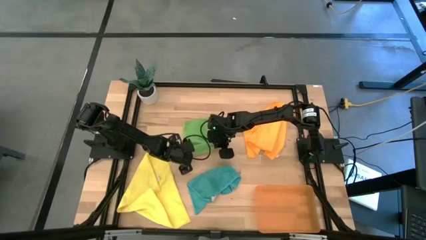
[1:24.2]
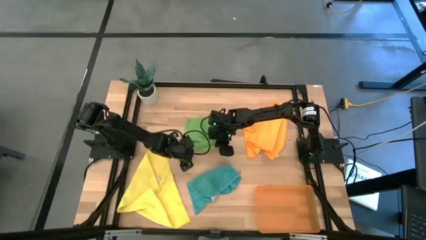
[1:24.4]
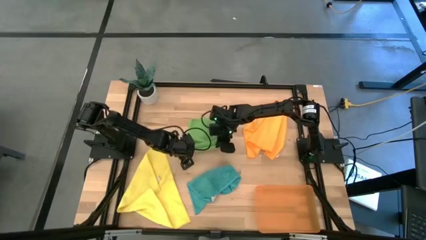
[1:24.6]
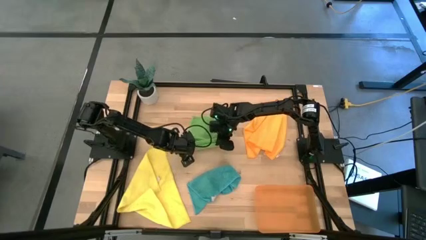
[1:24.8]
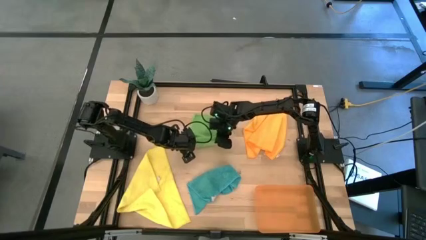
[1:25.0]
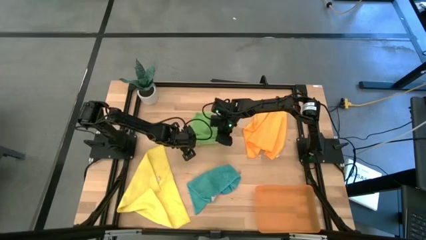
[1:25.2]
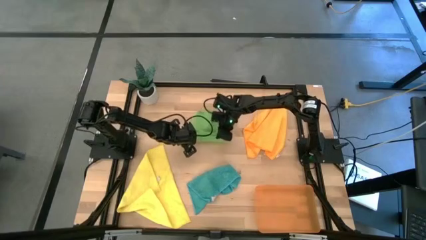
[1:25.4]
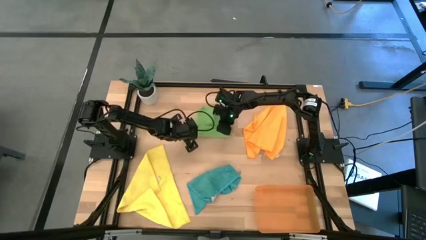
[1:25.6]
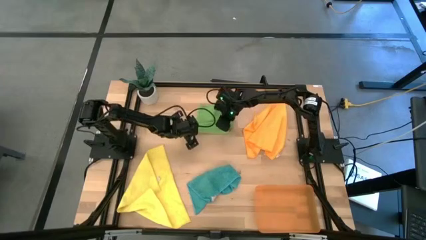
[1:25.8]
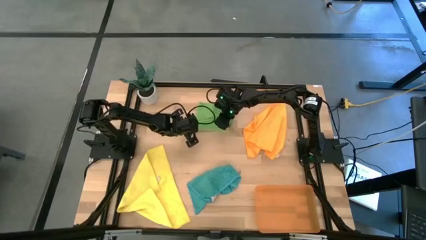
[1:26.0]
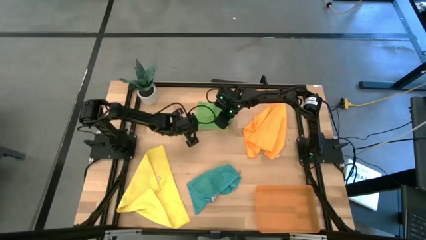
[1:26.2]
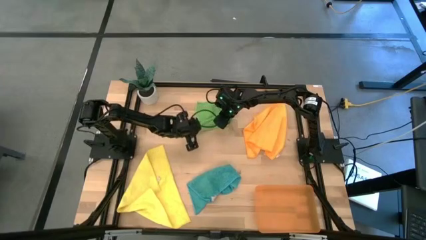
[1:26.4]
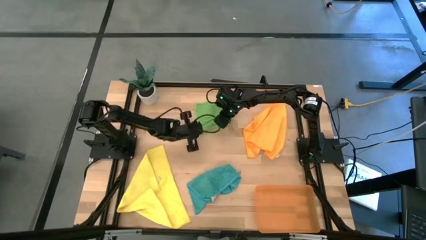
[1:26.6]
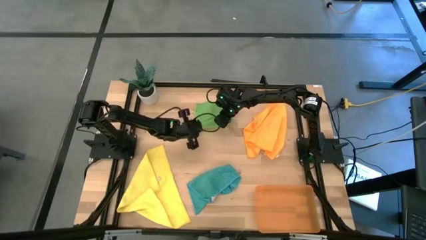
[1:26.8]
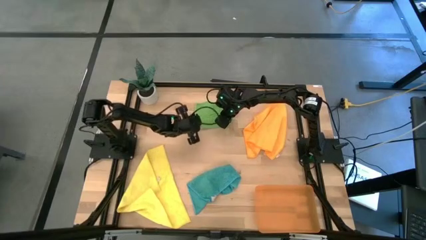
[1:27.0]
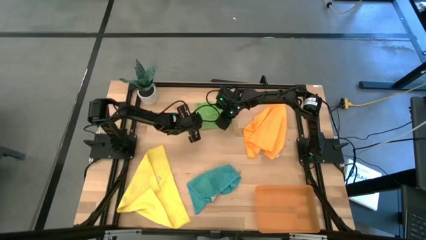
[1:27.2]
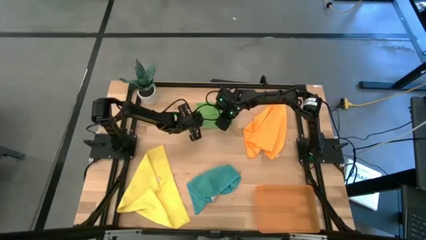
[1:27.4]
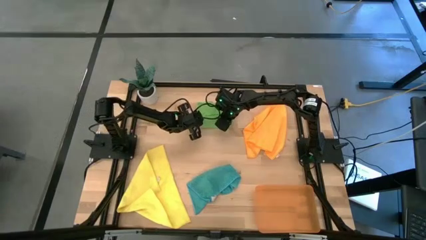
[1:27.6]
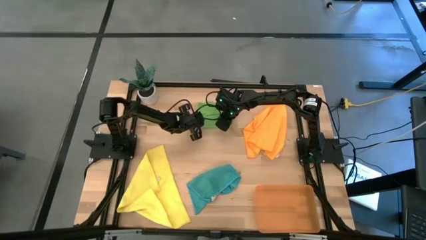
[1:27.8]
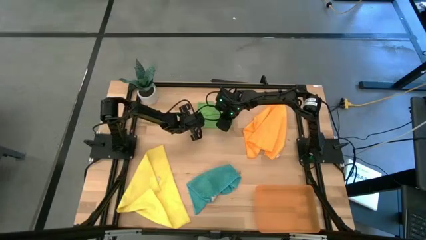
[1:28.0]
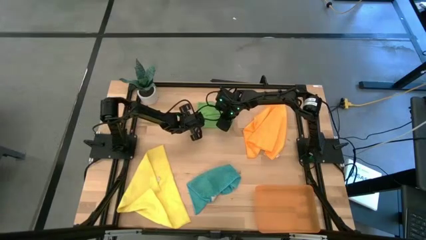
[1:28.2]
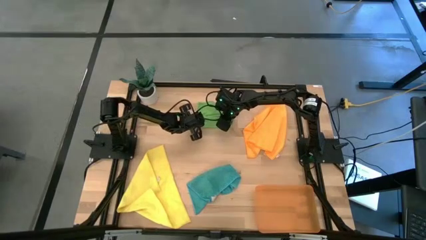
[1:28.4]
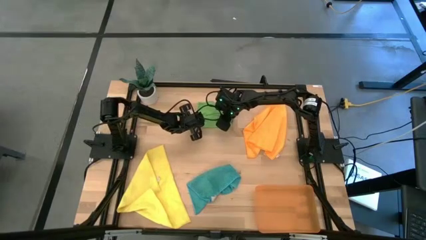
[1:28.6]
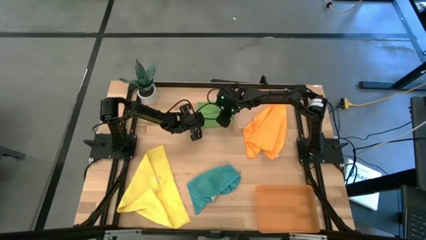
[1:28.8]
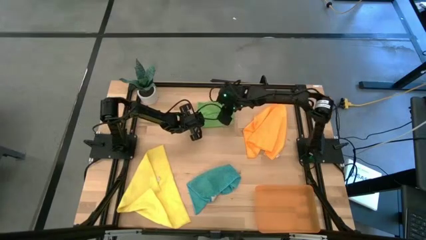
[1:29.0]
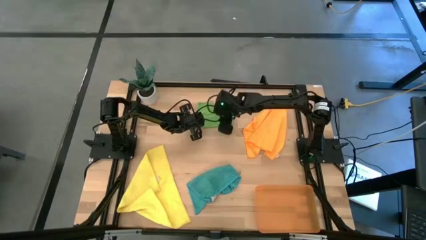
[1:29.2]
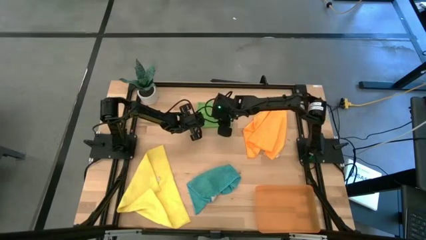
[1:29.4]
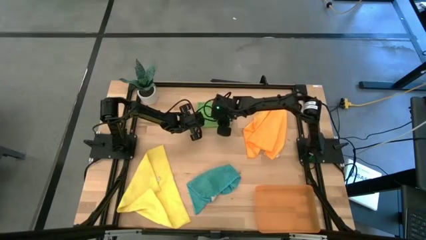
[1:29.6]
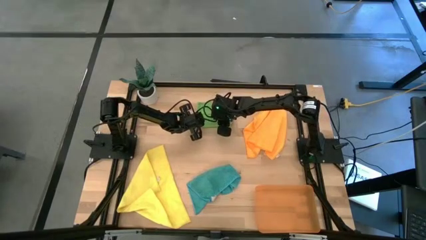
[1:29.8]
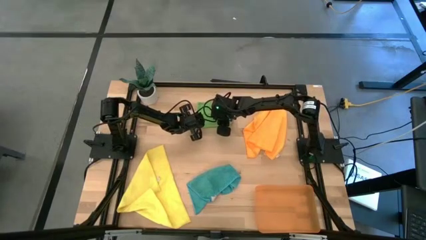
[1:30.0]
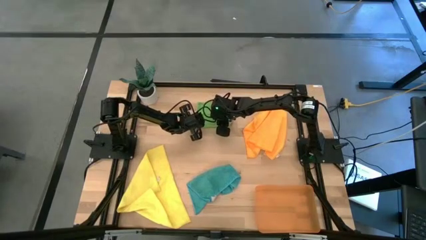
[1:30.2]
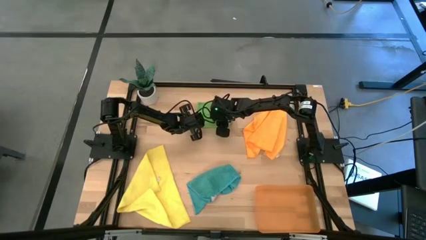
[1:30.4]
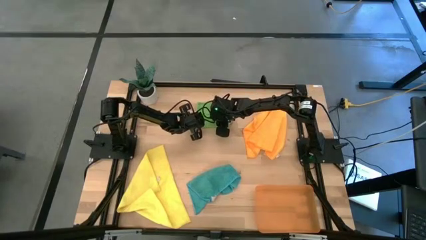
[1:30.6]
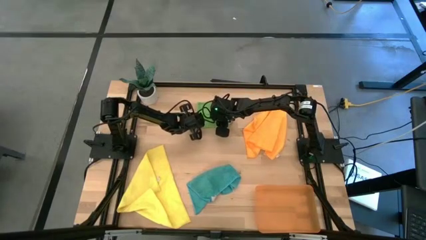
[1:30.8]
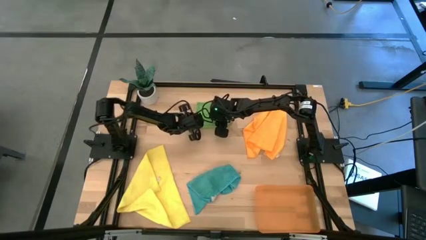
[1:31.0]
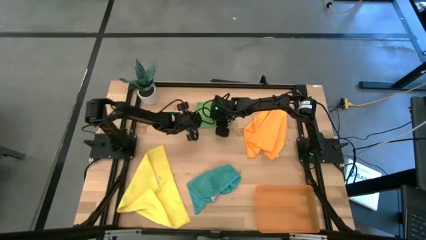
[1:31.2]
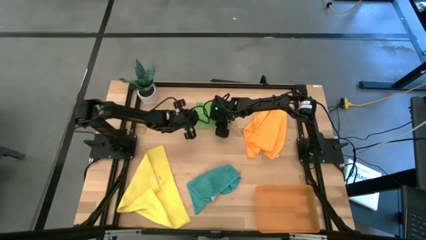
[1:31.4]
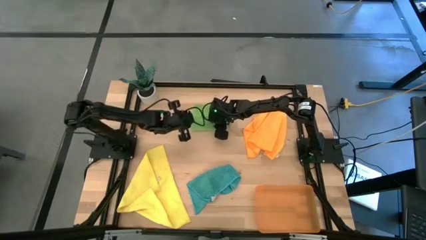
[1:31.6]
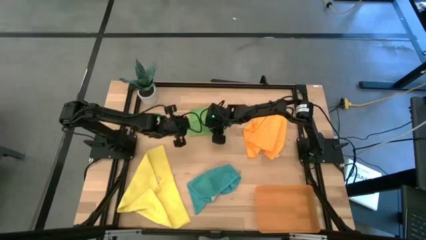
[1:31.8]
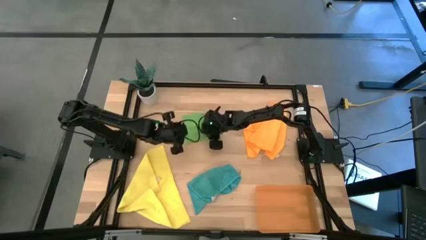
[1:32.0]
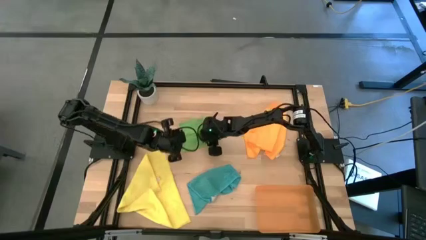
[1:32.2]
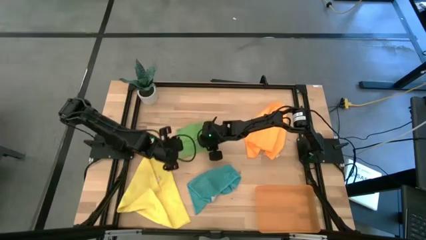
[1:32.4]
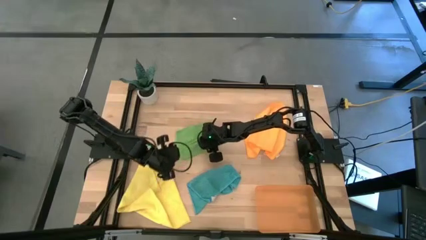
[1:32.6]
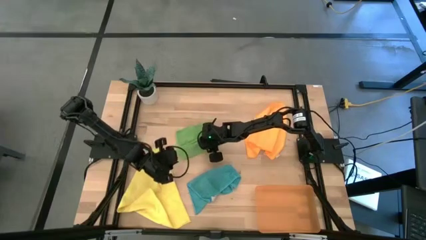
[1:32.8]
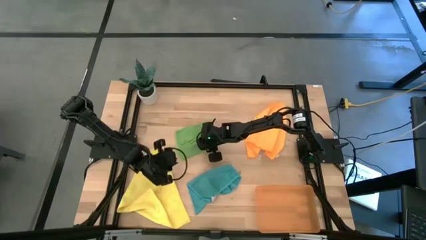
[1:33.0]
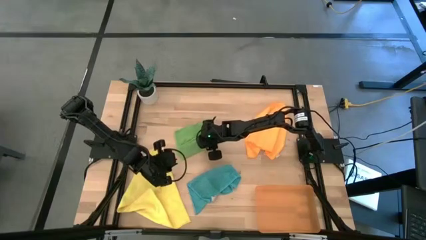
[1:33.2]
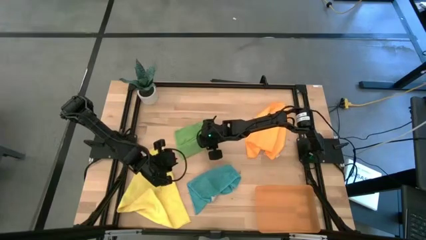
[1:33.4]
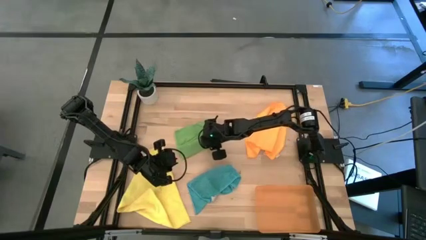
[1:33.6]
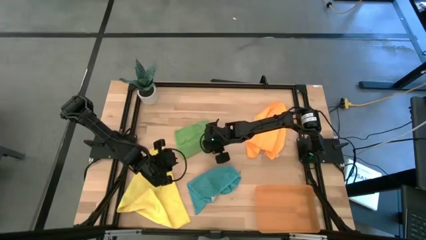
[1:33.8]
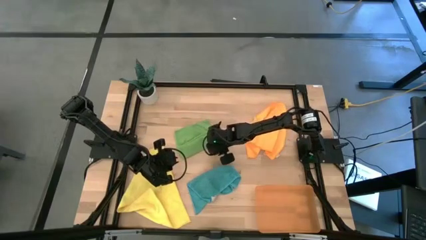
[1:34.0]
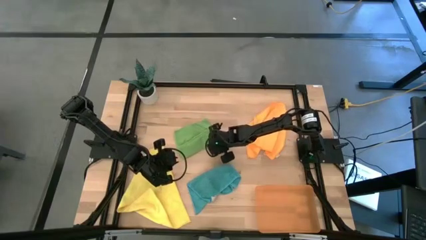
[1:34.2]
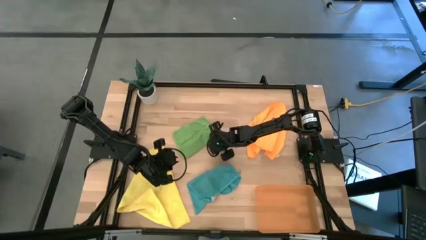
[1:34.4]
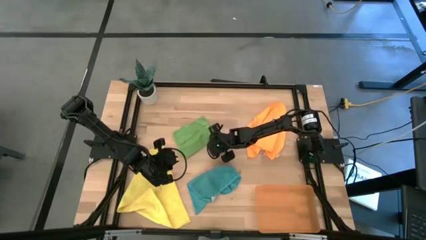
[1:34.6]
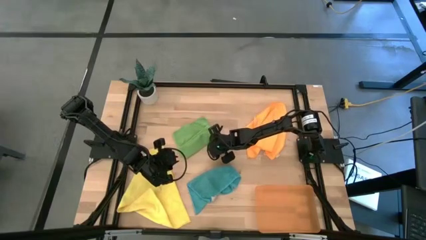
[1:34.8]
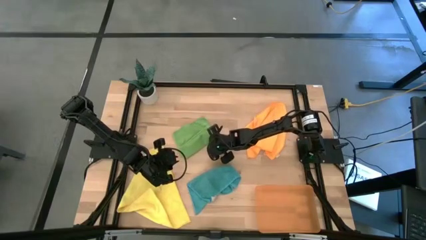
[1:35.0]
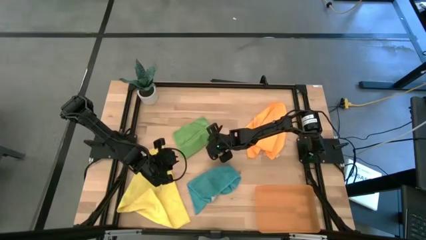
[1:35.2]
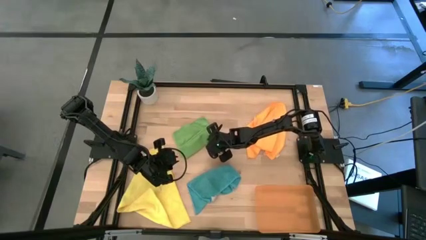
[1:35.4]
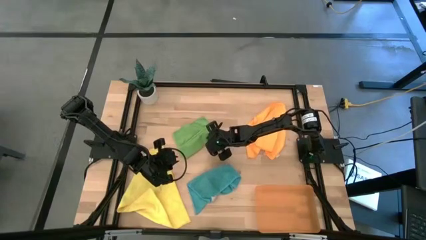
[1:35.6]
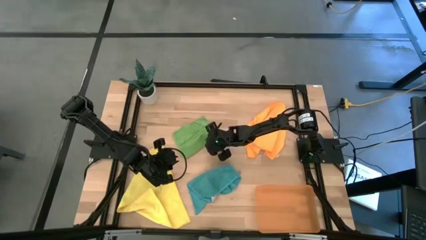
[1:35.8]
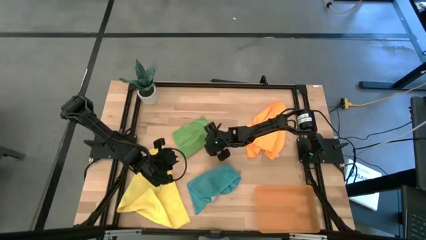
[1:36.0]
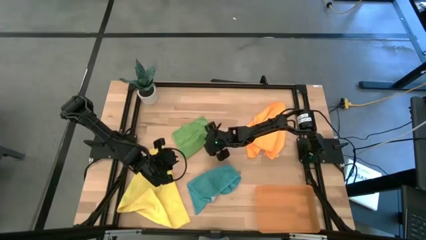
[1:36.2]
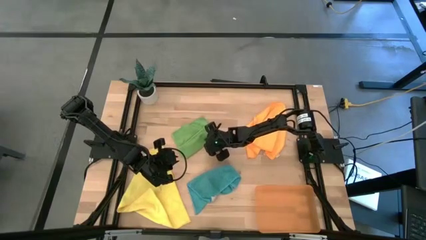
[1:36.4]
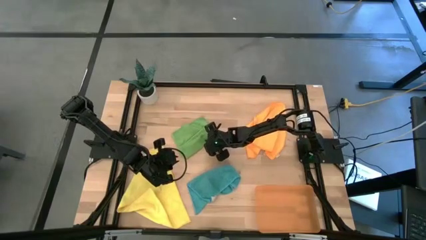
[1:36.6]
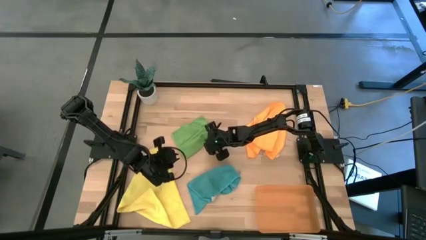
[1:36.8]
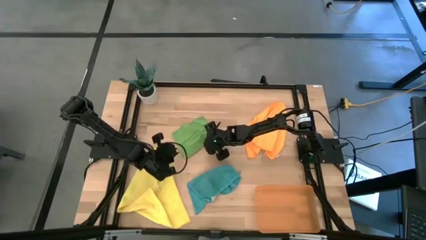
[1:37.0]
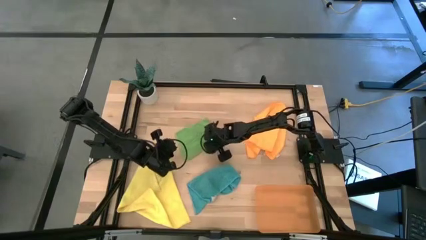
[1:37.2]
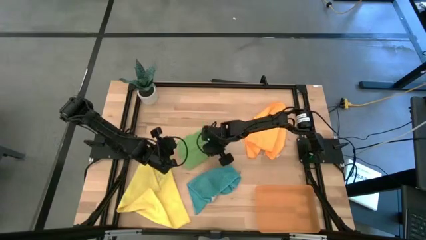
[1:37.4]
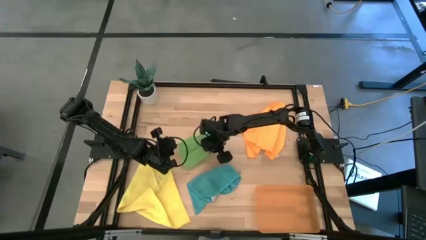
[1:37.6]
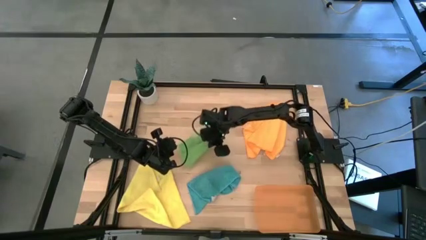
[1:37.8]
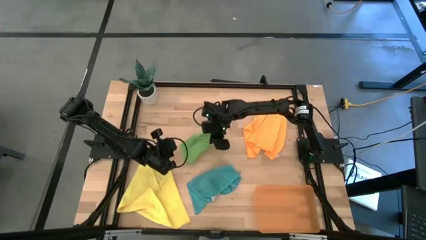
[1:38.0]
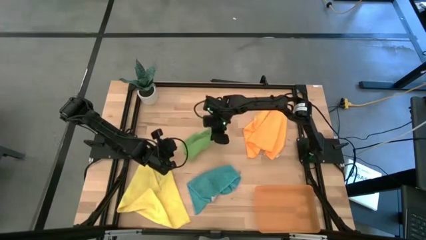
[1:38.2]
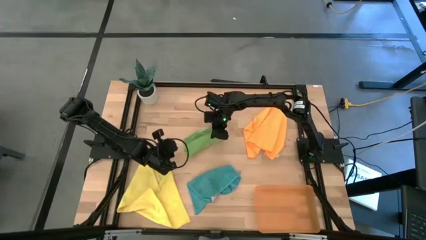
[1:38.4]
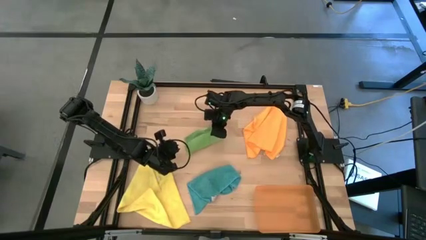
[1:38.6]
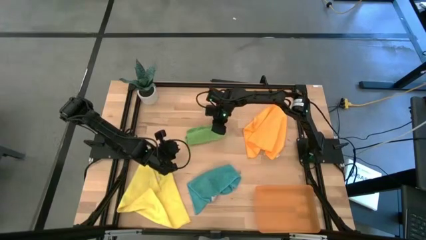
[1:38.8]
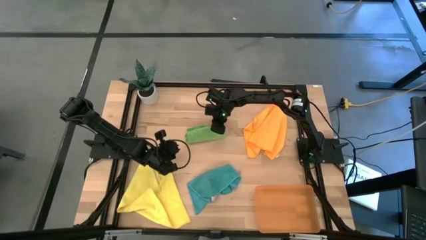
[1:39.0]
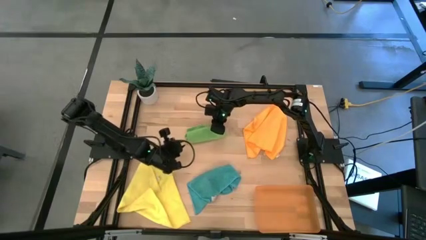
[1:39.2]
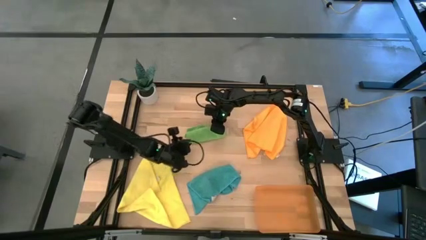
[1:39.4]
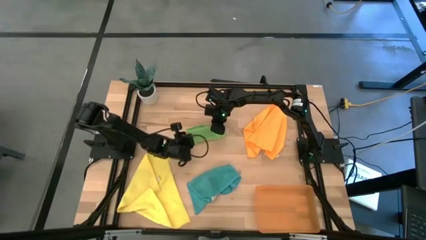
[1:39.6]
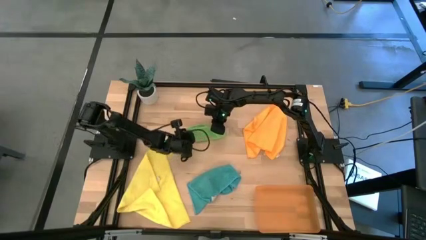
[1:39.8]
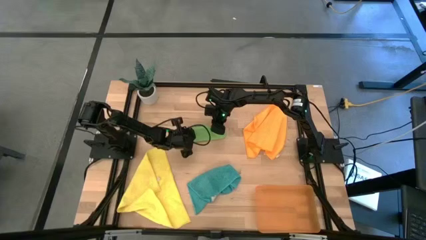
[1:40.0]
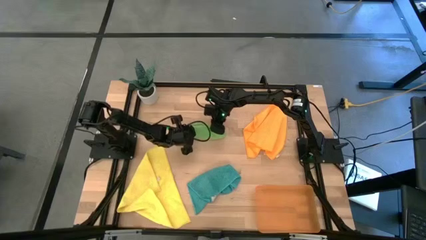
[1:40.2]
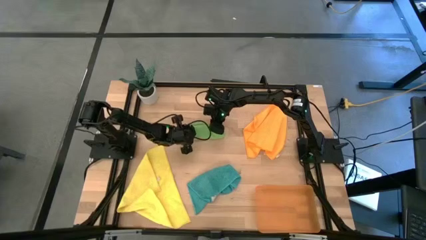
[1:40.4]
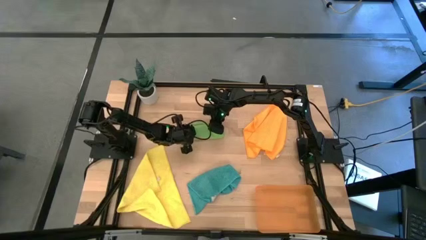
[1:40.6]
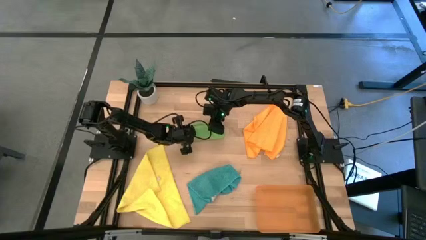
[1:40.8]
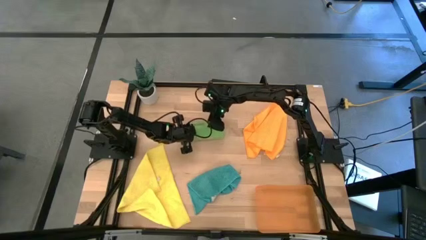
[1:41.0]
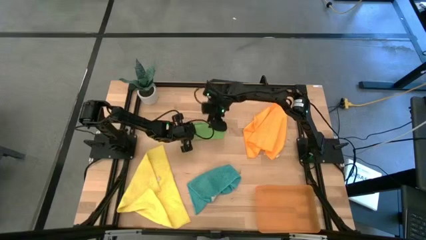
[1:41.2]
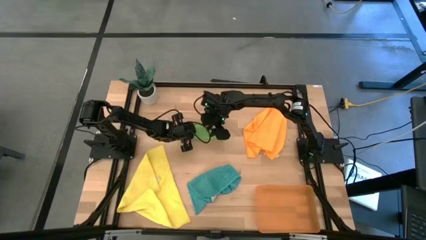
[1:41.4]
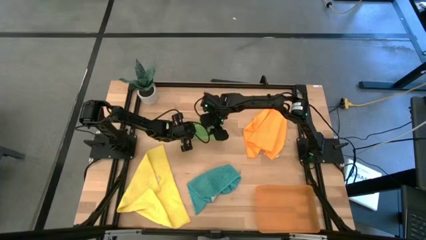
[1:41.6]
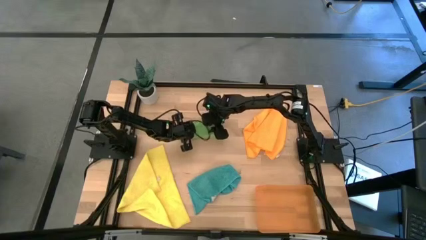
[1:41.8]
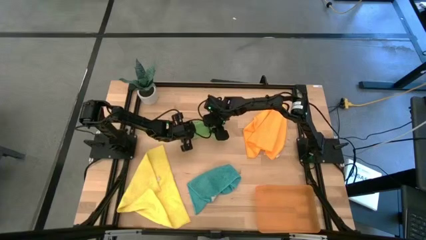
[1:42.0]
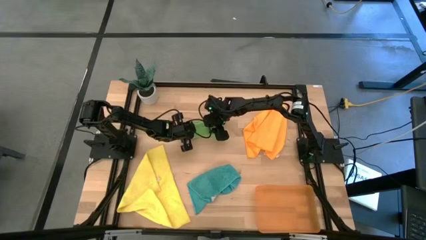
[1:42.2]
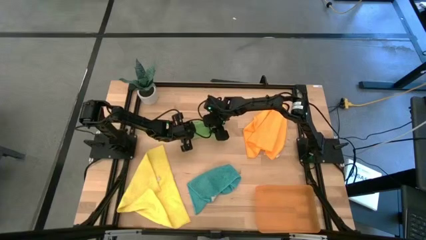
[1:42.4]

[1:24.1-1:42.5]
Task: Roll microfiber towels into tight, uniform cylinder then place into a basket
Roll the green microfiber towel
